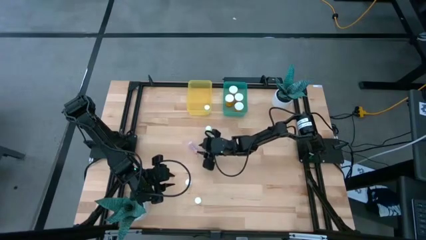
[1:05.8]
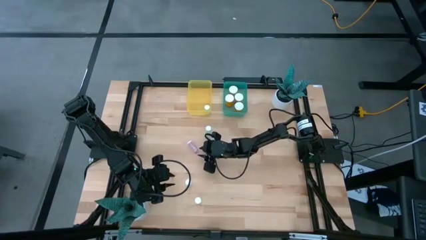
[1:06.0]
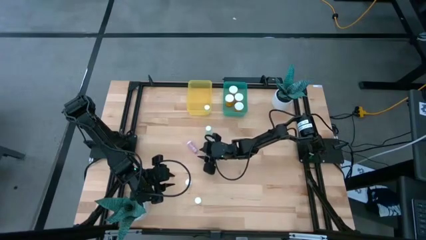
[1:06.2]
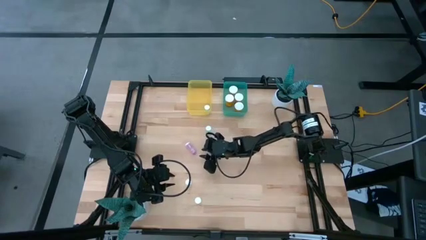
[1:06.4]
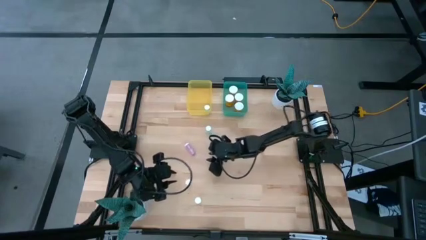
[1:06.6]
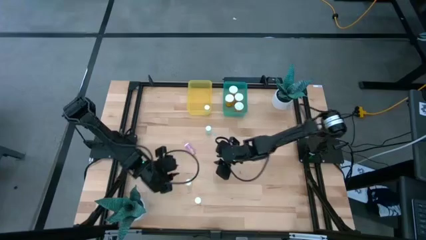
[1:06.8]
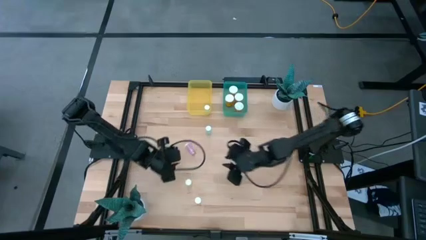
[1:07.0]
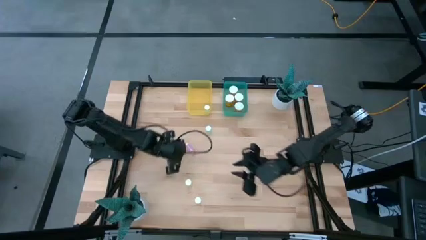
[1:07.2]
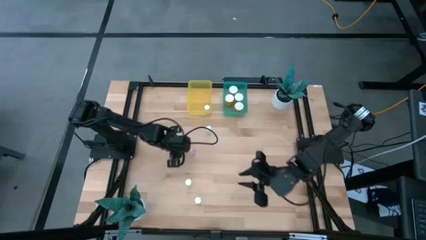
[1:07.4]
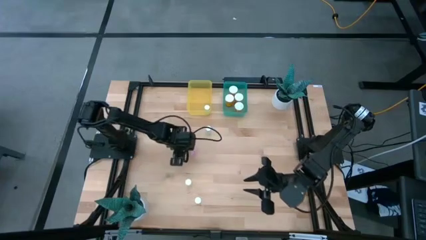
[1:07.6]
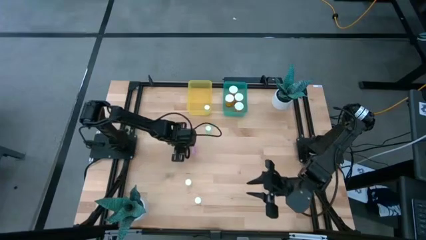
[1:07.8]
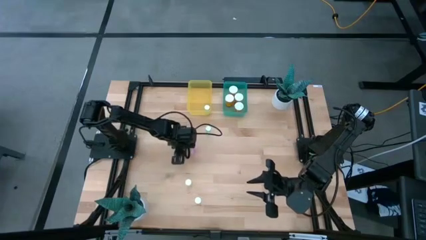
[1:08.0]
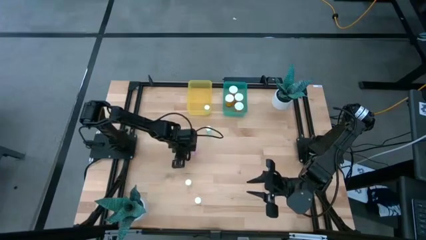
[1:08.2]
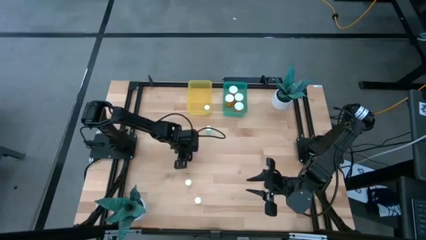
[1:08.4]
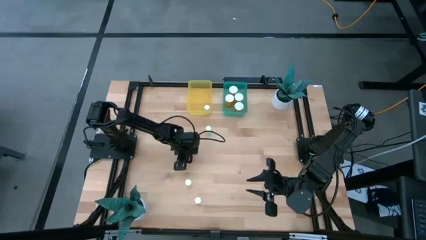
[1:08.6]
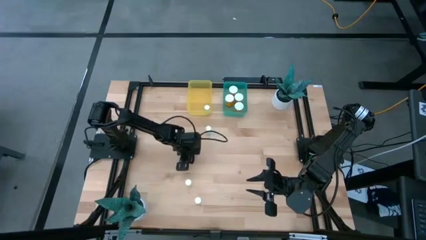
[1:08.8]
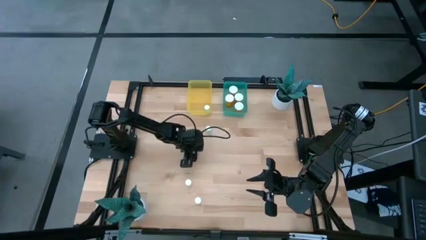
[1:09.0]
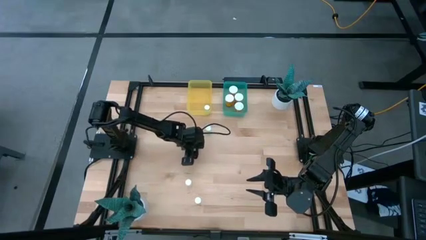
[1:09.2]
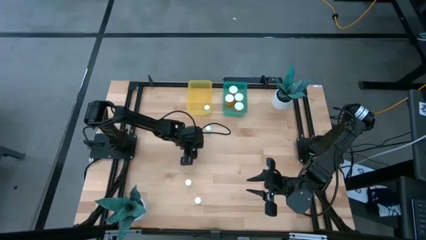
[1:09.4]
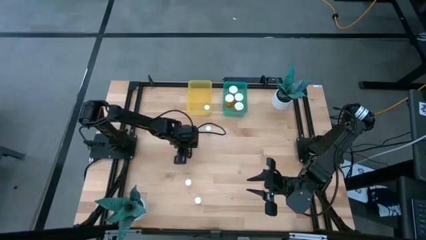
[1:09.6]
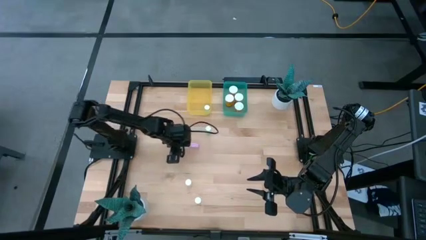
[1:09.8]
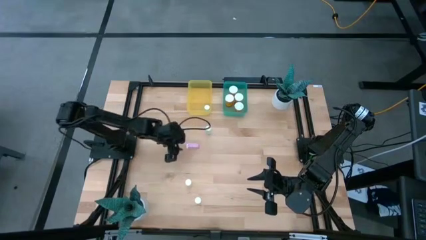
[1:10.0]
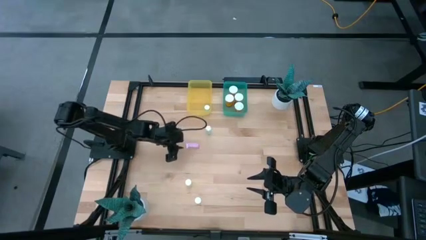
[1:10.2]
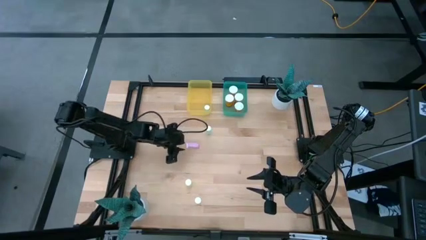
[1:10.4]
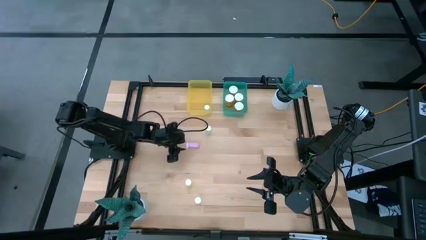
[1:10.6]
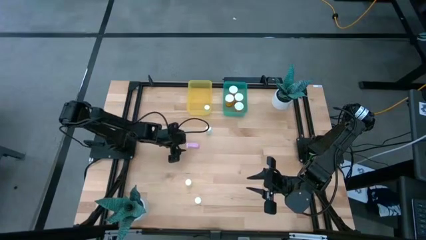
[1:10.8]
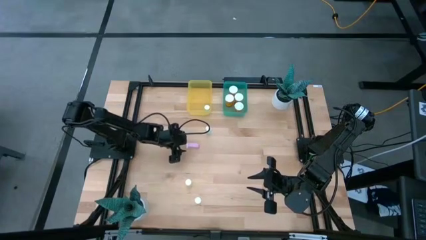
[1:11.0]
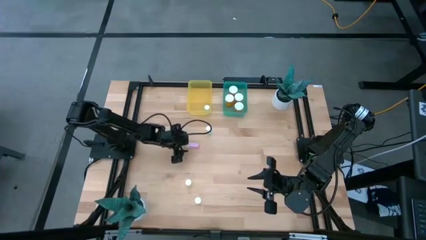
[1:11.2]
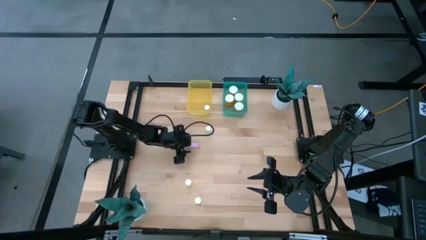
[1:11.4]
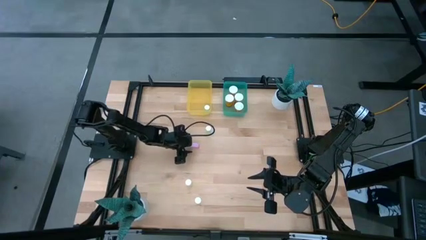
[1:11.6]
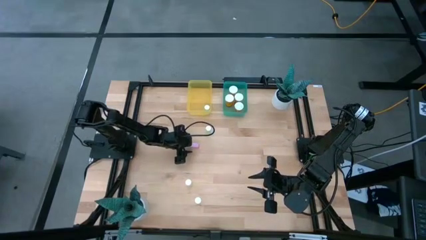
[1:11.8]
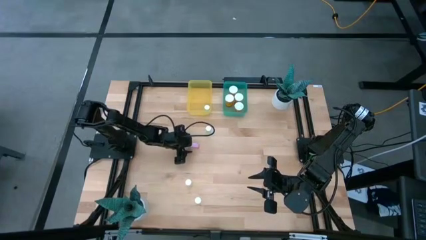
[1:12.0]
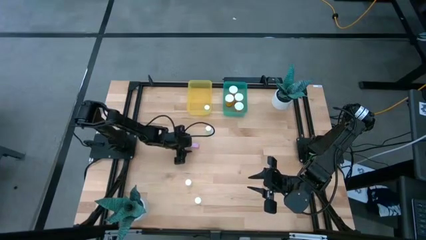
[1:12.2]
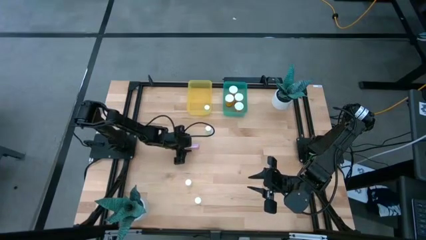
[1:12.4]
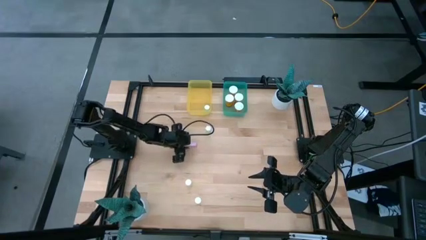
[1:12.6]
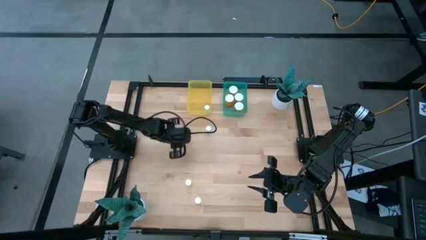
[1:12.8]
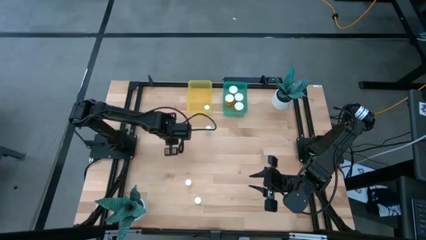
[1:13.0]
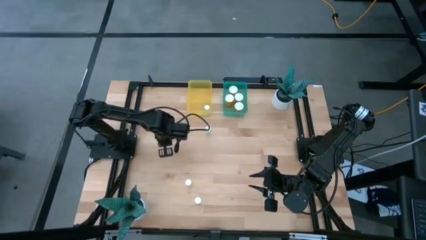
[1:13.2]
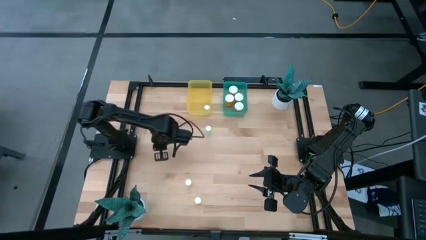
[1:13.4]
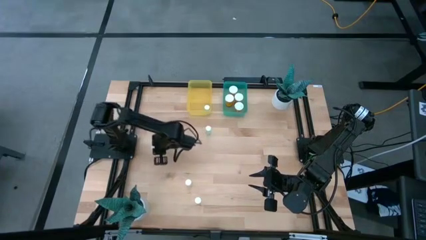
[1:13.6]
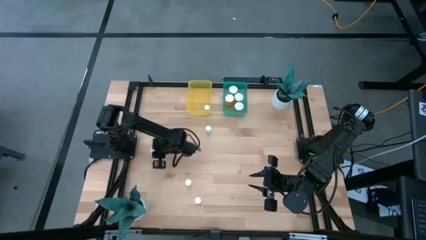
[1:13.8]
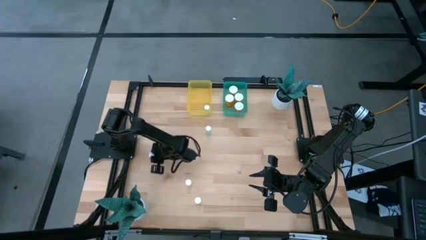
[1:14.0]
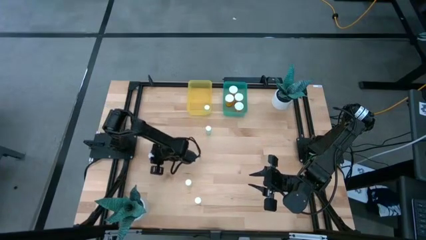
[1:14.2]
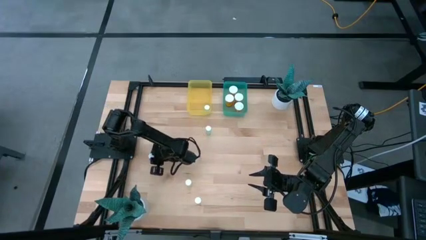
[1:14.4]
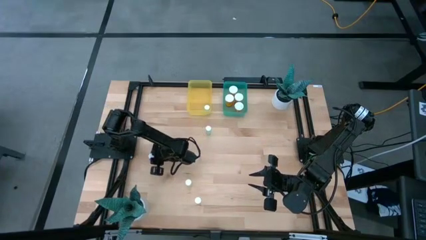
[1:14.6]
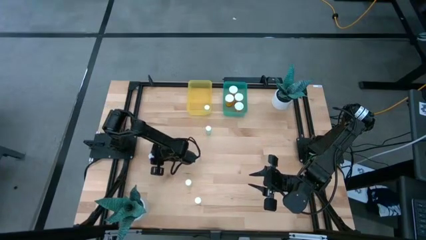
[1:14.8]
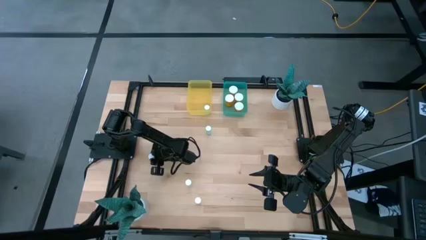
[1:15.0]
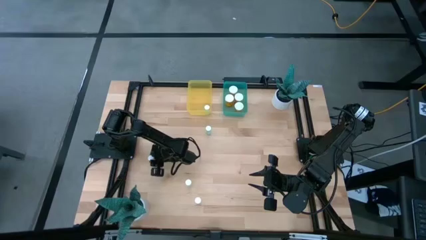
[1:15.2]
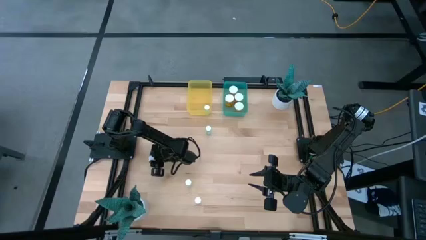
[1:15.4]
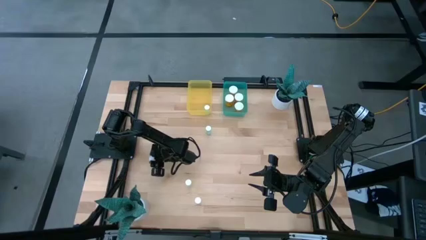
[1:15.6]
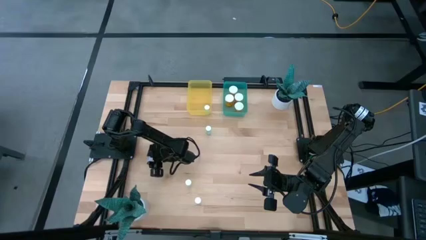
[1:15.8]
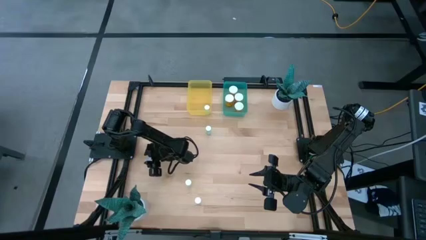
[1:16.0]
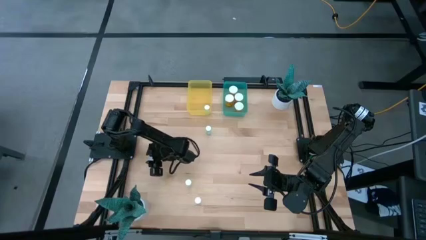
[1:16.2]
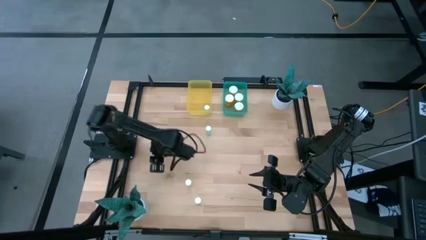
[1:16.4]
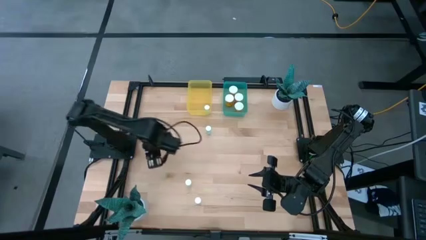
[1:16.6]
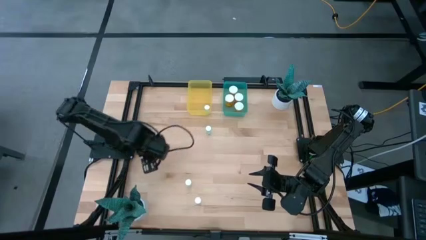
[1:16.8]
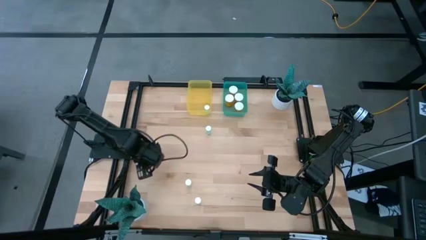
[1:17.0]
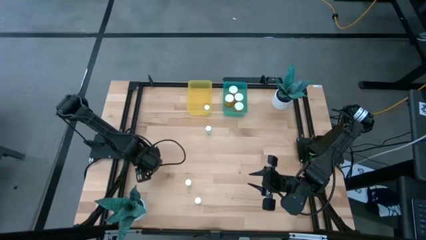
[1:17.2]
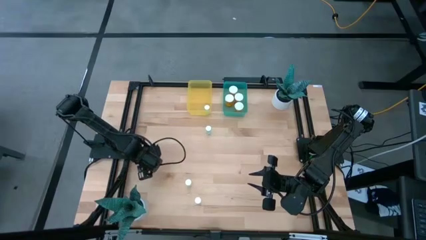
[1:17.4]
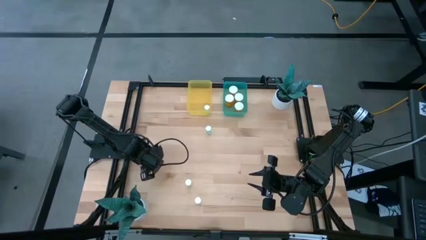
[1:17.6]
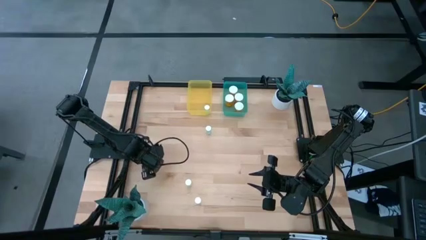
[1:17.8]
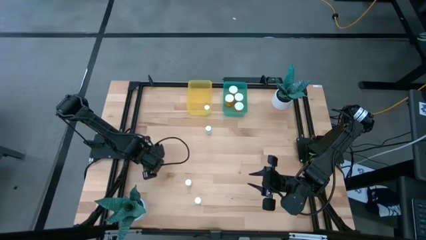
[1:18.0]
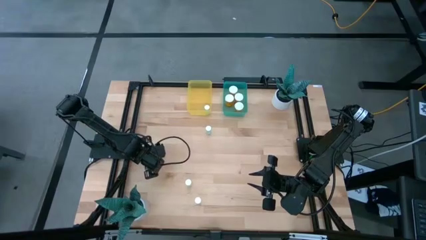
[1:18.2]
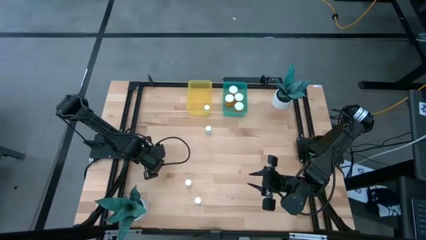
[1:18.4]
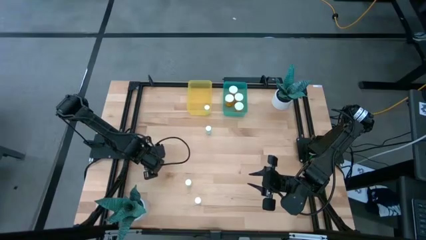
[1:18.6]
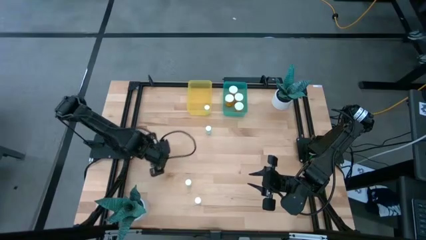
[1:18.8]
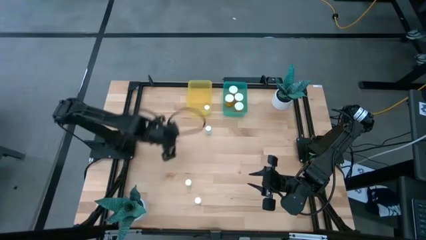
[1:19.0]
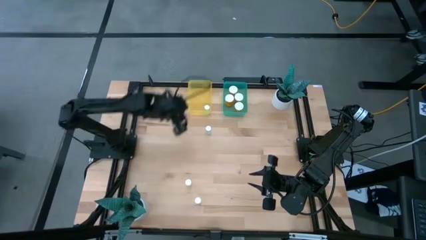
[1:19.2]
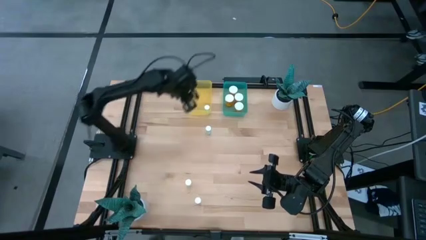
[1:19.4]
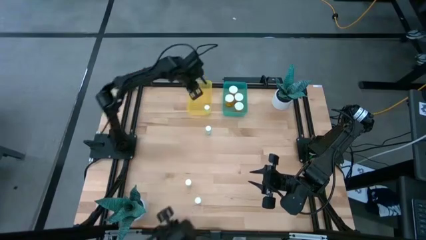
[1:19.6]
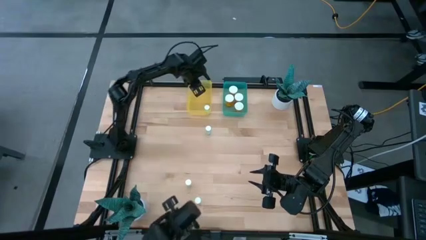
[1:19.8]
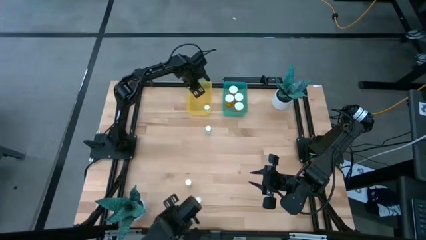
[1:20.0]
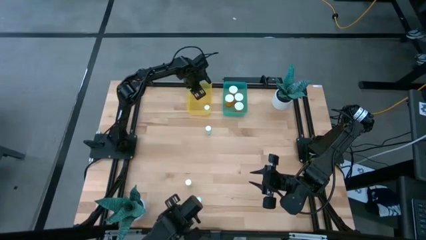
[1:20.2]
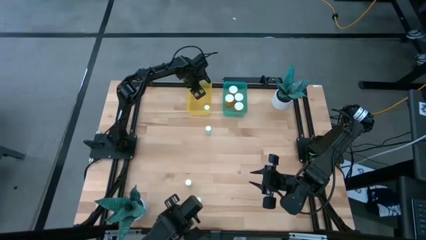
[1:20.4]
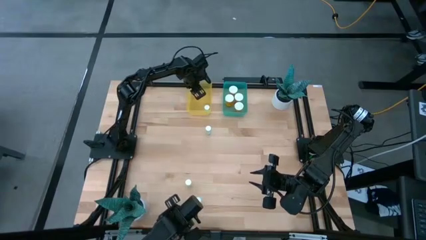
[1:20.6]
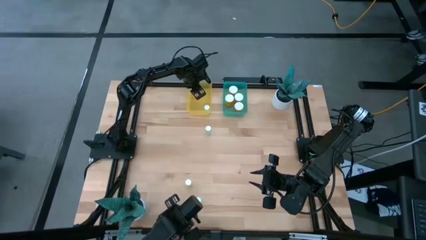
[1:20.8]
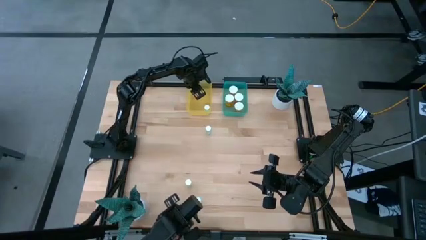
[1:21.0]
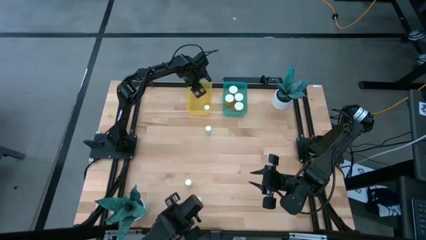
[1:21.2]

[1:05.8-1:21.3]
Task: Pick and place medicine bottles into bin by pill shape (circle, oval)
Put the pink tablet bottle into the yellow bin
